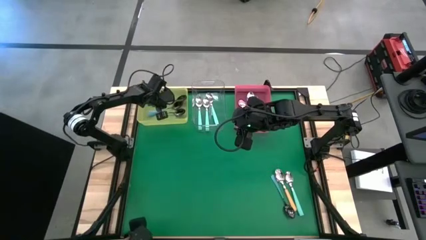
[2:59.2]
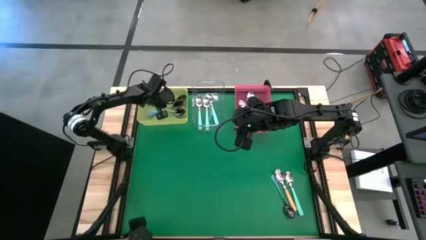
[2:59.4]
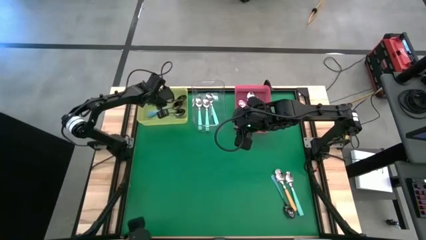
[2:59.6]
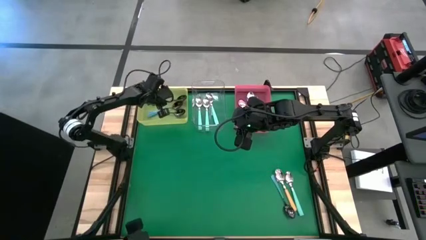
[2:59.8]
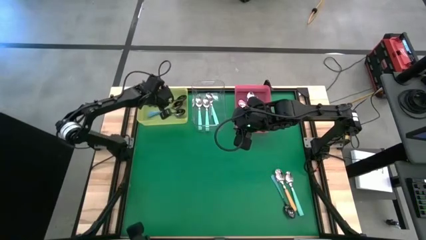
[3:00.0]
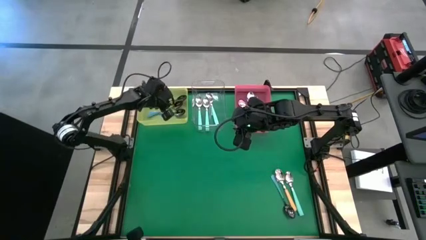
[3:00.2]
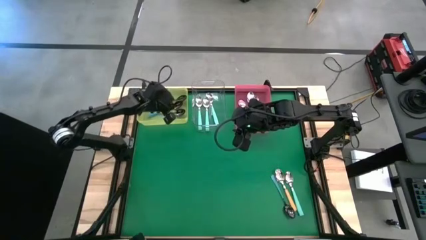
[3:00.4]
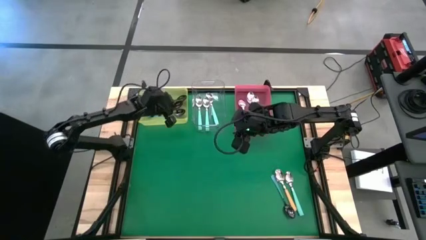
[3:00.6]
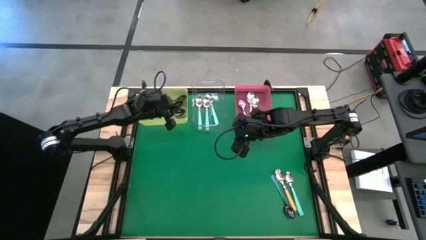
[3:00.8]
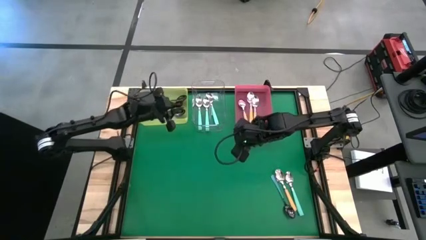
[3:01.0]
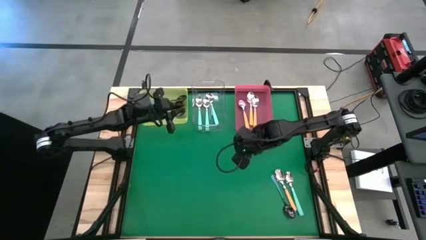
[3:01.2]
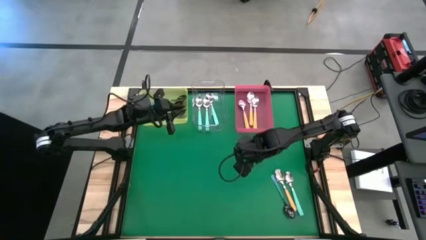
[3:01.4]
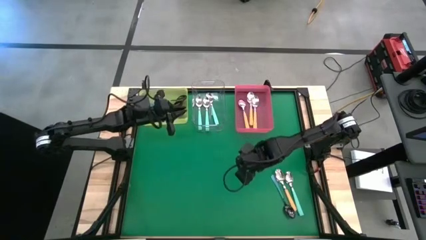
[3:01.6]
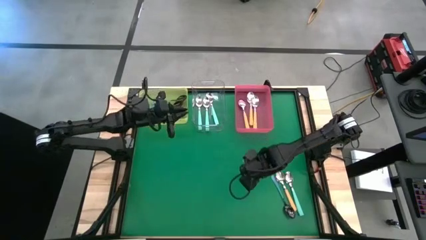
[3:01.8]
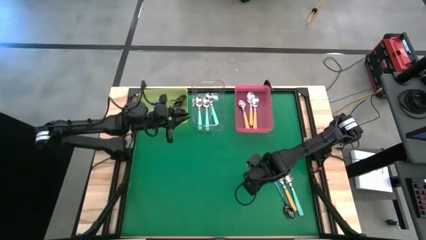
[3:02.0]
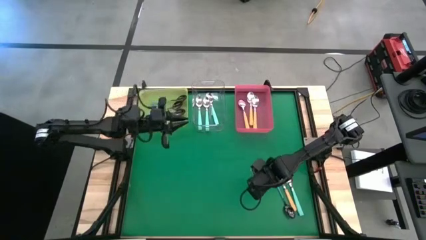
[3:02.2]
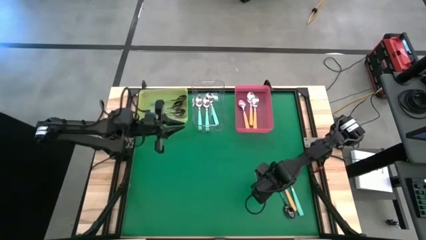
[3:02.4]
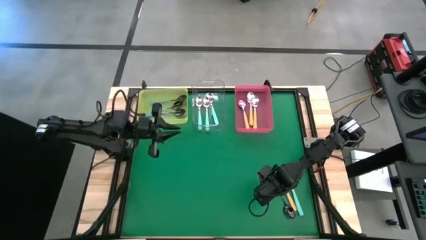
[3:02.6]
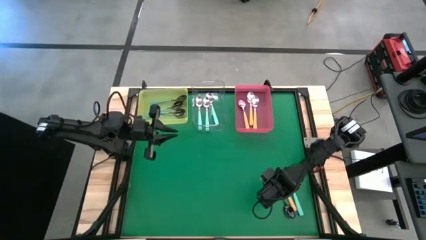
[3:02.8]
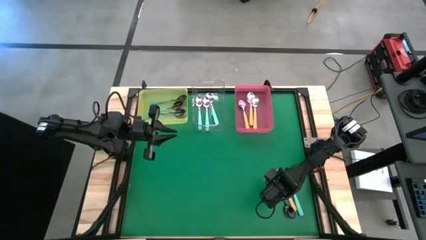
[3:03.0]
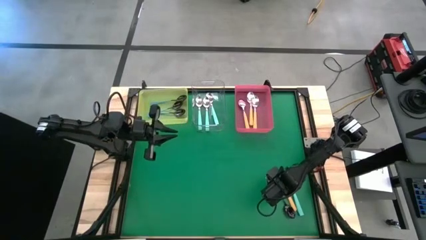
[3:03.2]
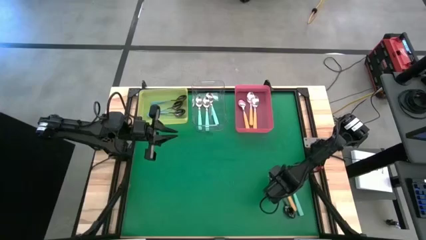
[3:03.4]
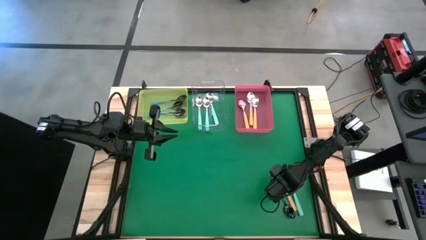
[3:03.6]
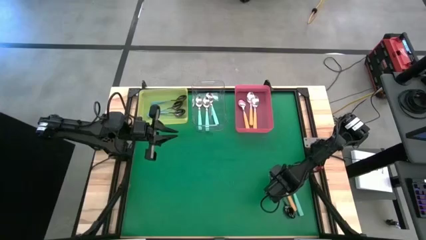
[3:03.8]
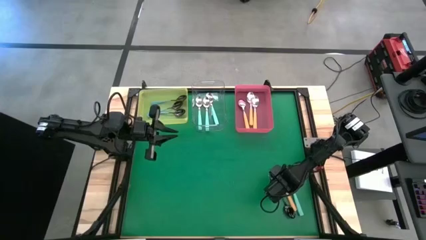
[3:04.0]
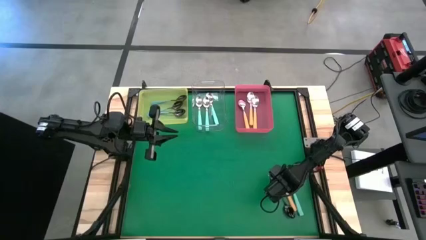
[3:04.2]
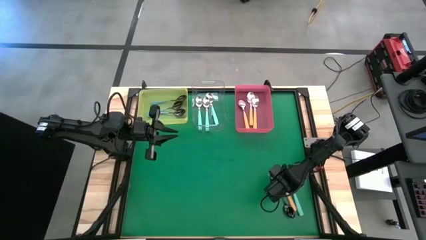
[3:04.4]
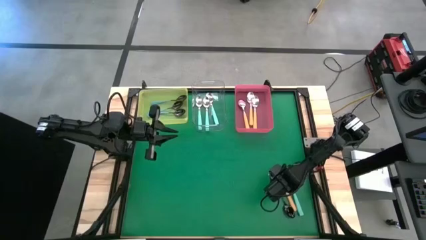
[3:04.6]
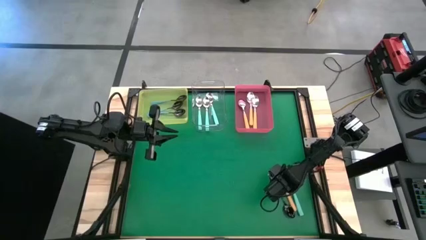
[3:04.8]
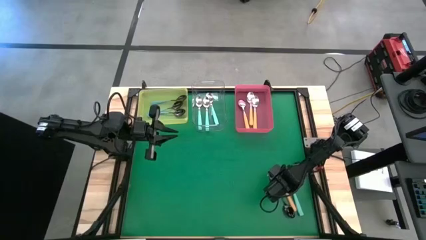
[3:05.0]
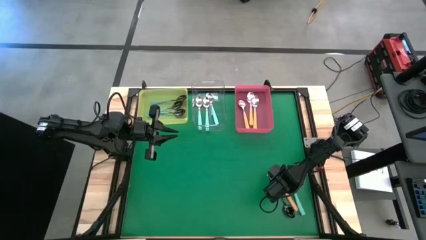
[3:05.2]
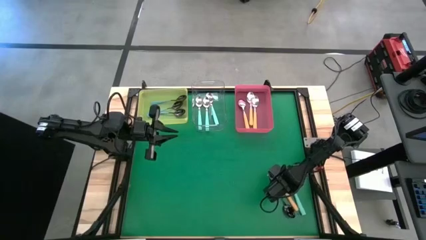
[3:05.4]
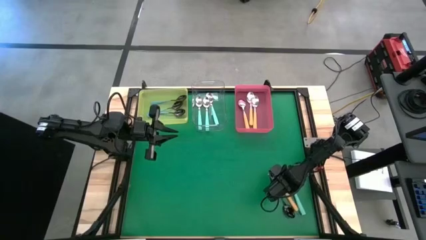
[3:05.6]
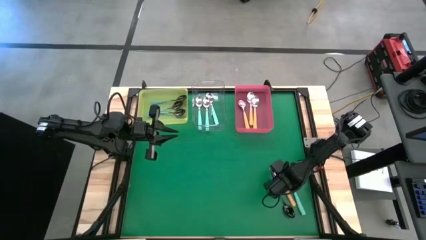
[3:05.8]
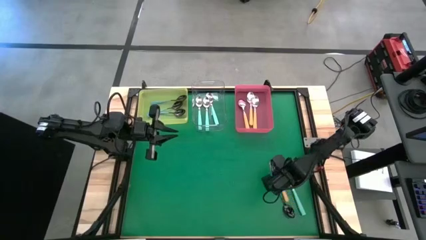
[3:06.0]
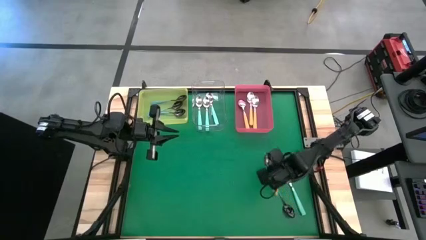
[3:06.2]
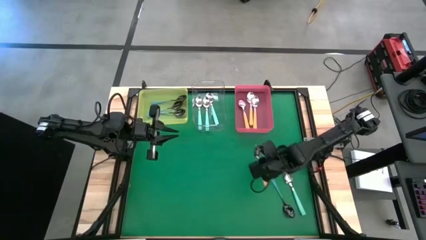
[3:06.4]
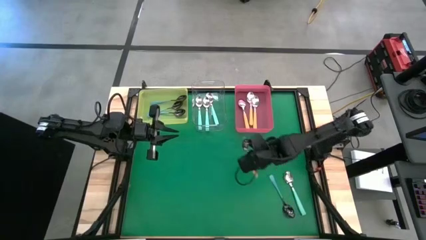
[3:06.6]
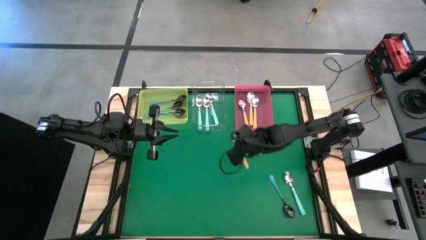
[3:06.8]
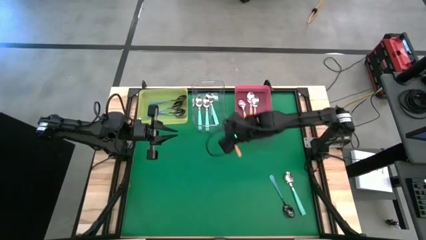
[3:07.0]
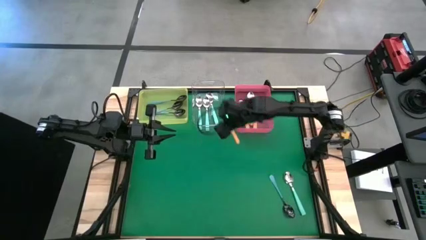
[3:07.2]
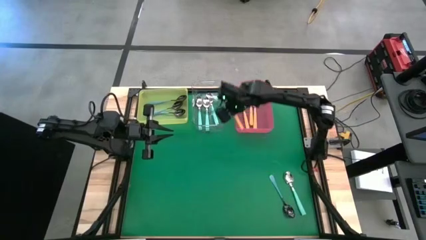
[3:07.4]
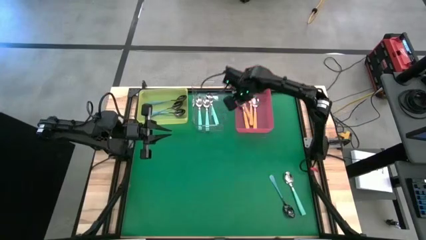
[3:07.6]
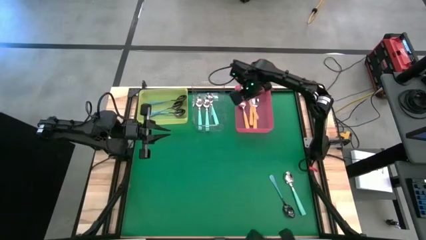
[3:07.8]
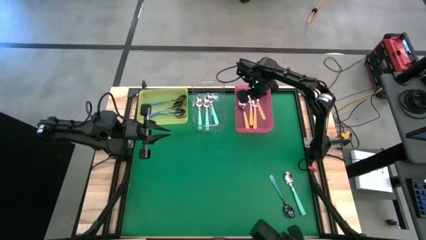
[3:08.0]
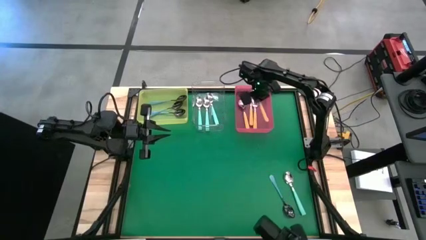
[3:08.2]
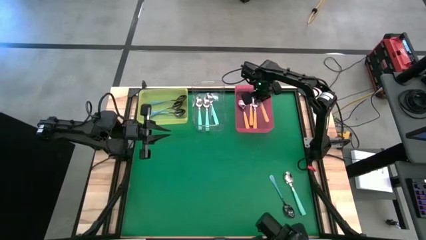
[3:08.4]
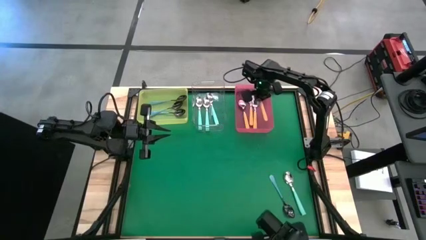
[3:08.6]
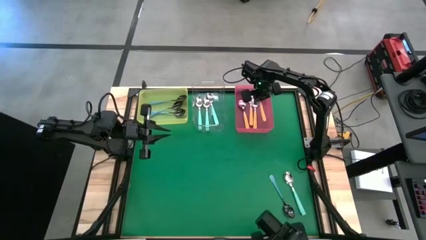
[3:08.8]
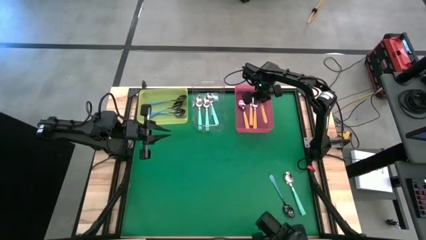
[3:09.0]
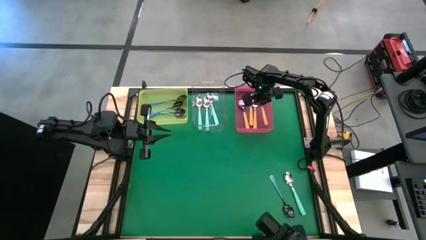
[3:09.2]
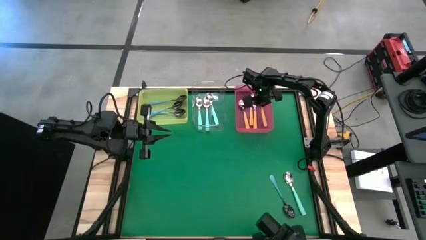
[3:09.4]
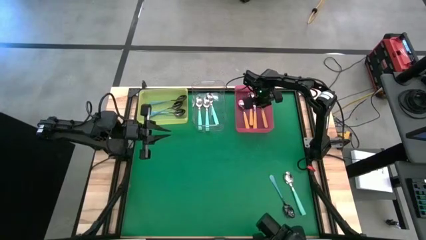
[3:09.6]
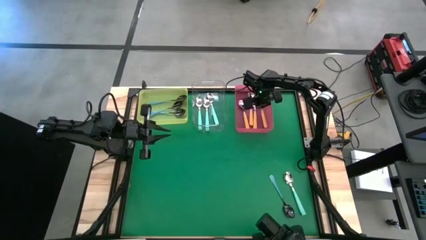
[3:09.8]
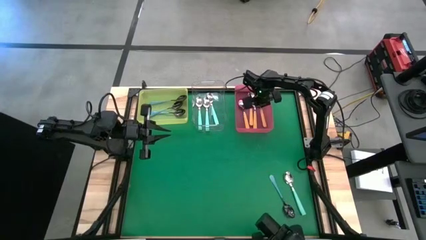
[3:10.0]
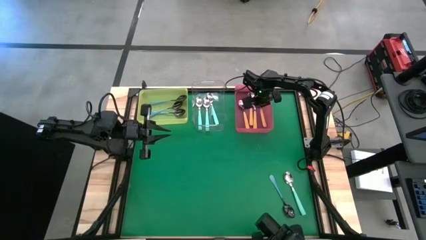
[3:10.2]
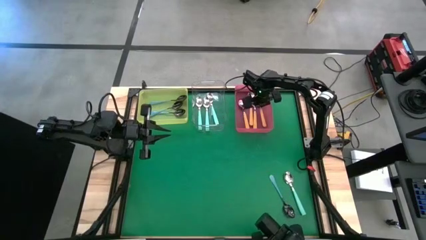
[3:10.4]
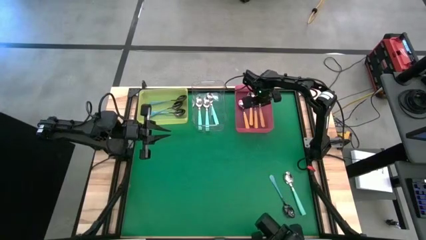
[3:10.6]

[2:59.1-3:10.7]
Task: Sort silverware by color (type)
Put the yellow spoon into the red bin
